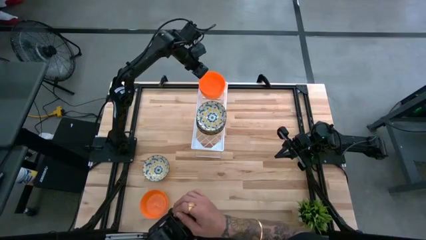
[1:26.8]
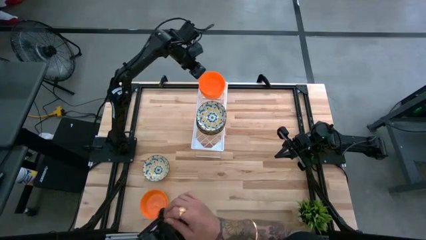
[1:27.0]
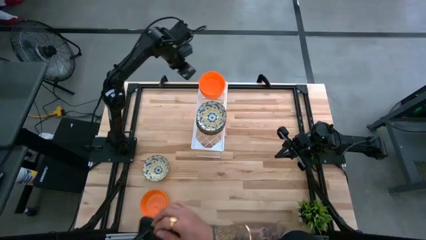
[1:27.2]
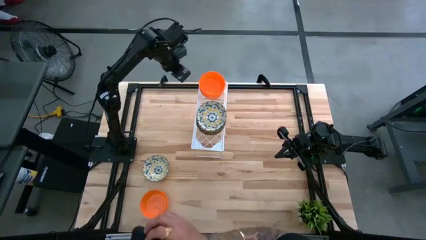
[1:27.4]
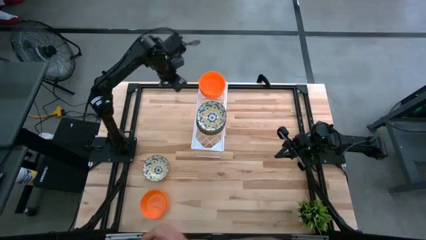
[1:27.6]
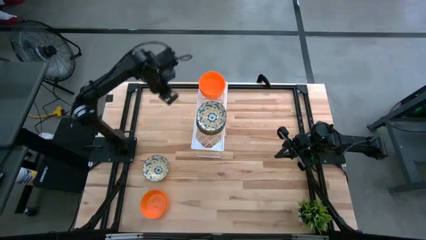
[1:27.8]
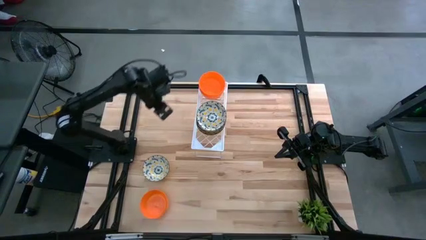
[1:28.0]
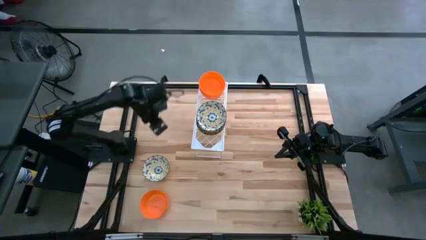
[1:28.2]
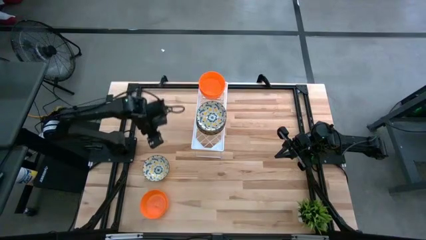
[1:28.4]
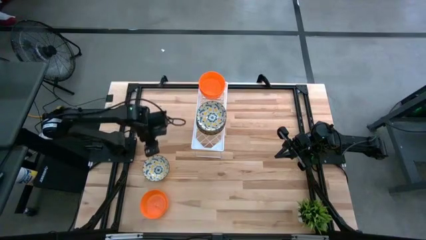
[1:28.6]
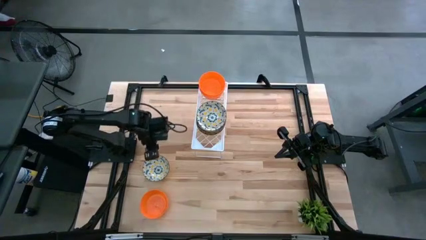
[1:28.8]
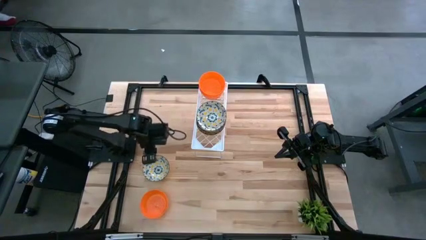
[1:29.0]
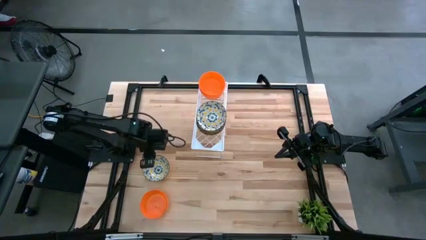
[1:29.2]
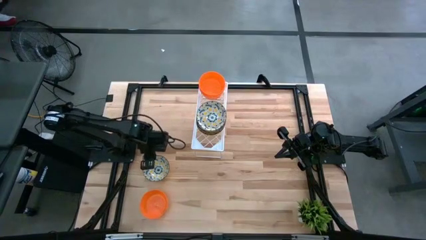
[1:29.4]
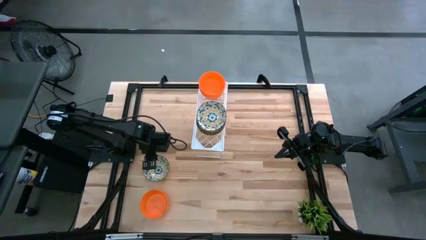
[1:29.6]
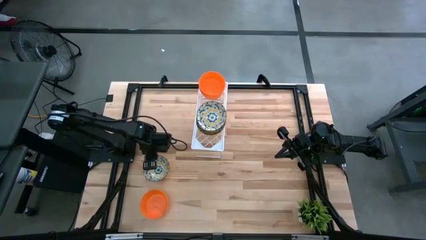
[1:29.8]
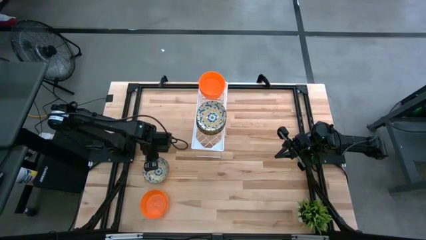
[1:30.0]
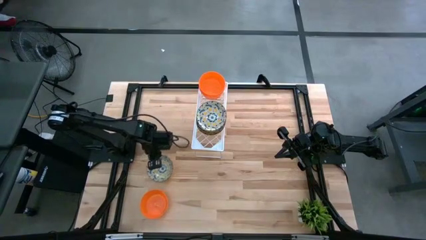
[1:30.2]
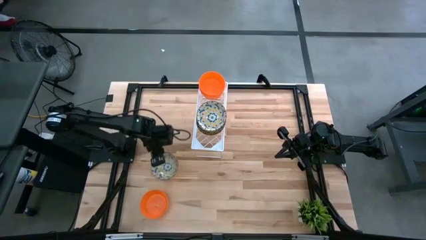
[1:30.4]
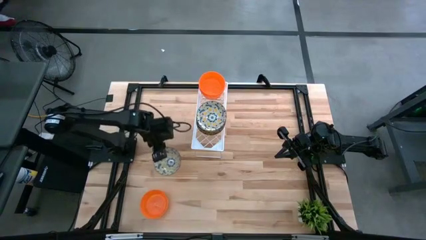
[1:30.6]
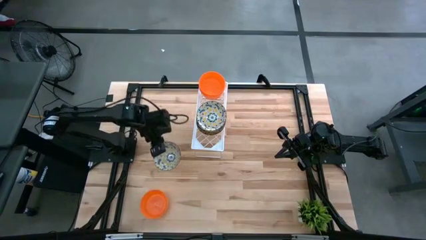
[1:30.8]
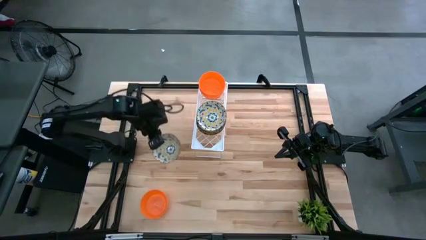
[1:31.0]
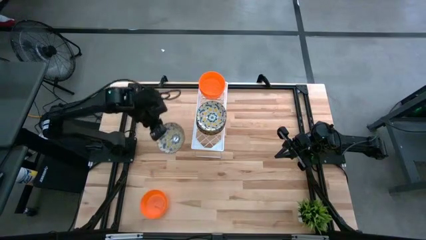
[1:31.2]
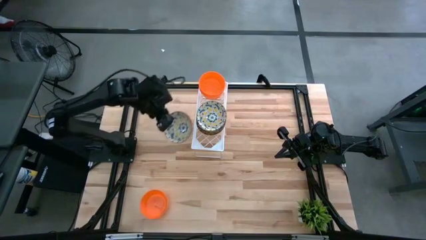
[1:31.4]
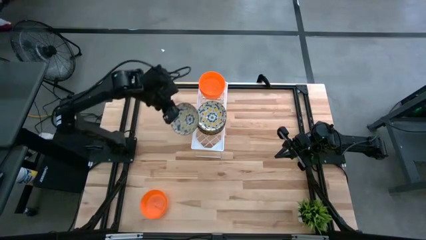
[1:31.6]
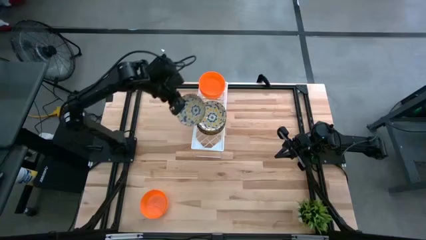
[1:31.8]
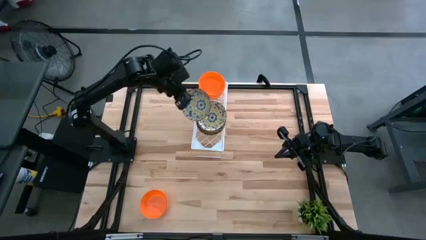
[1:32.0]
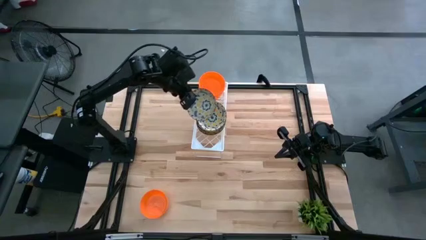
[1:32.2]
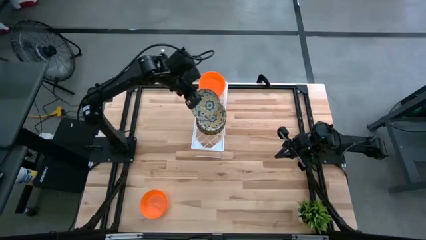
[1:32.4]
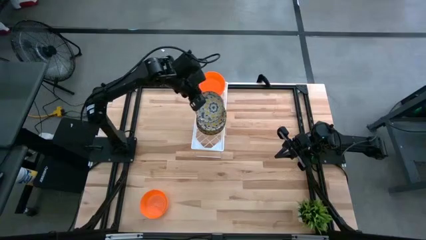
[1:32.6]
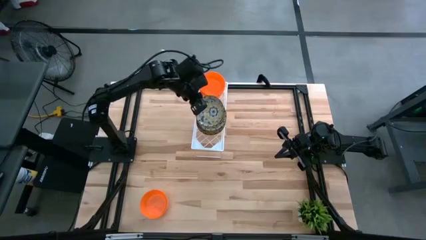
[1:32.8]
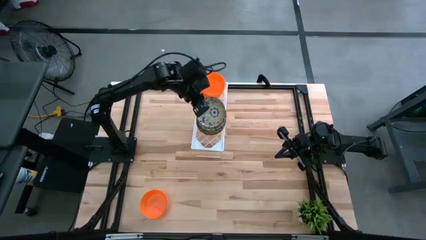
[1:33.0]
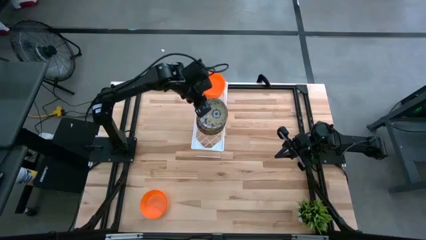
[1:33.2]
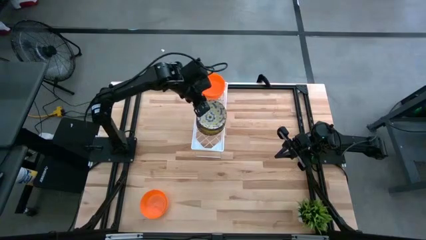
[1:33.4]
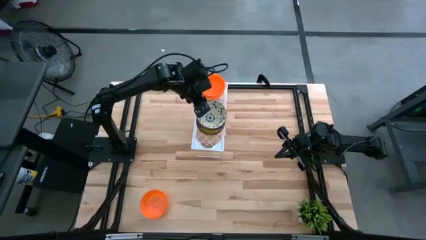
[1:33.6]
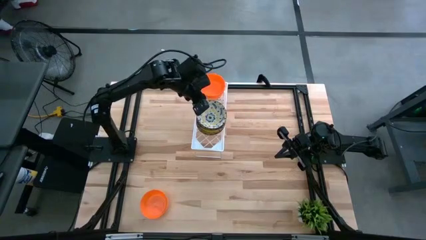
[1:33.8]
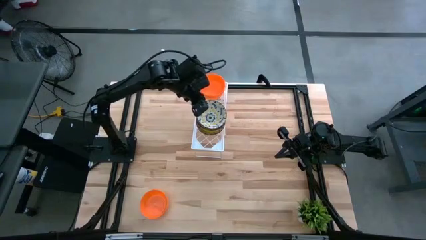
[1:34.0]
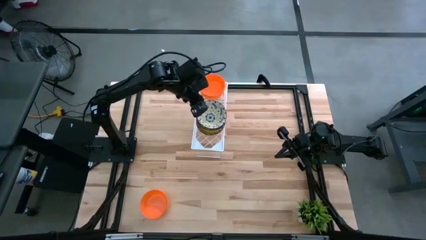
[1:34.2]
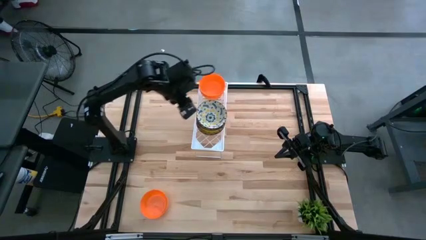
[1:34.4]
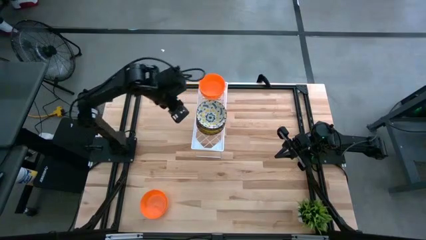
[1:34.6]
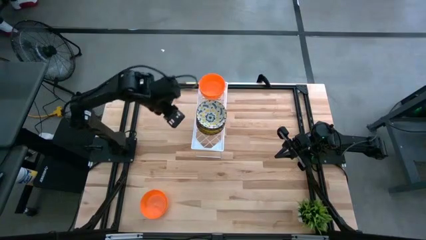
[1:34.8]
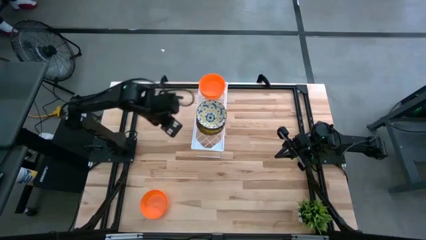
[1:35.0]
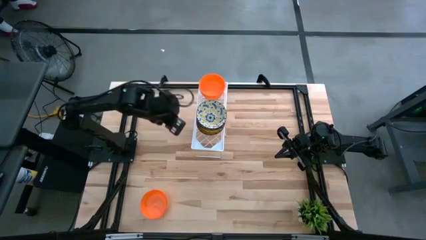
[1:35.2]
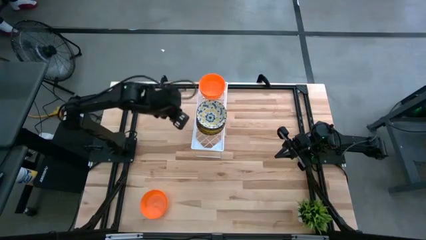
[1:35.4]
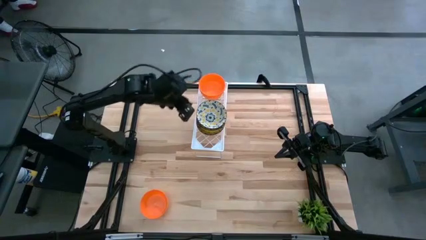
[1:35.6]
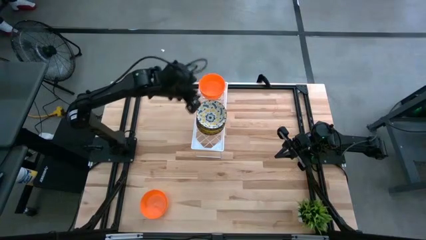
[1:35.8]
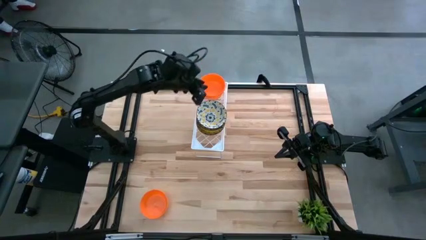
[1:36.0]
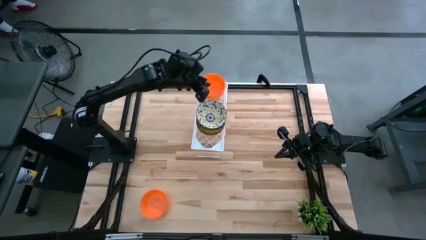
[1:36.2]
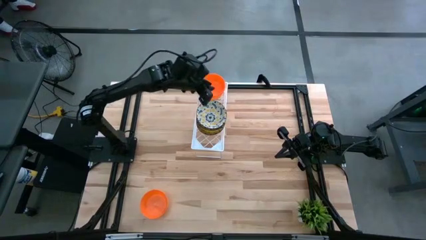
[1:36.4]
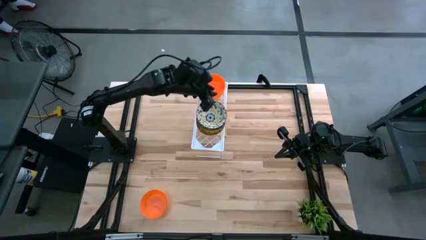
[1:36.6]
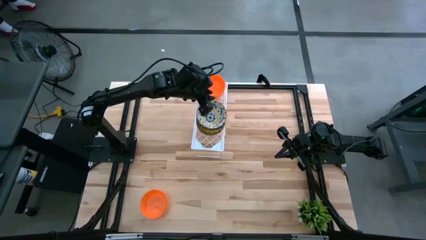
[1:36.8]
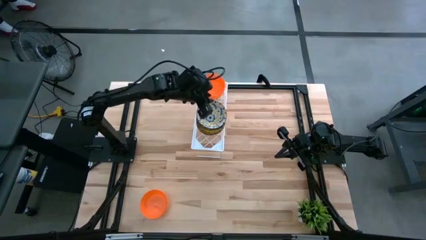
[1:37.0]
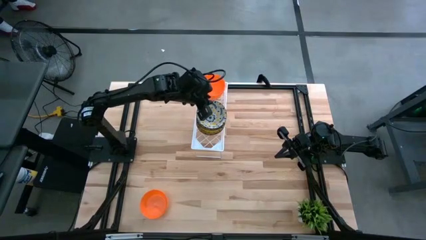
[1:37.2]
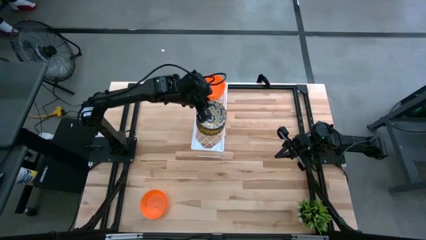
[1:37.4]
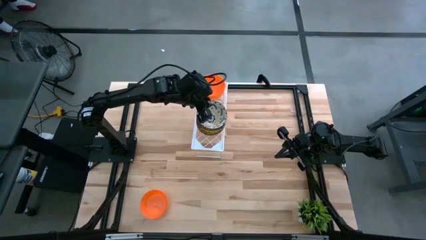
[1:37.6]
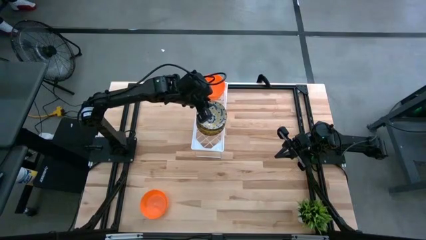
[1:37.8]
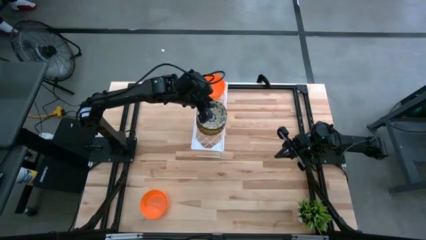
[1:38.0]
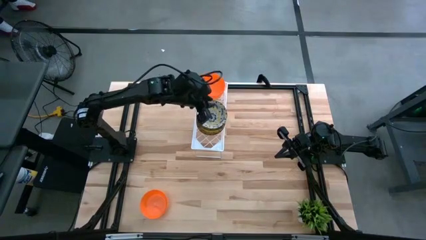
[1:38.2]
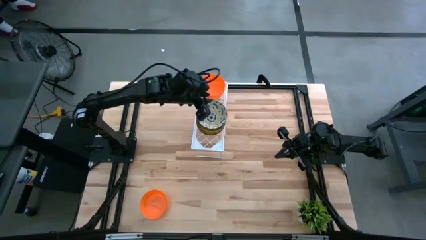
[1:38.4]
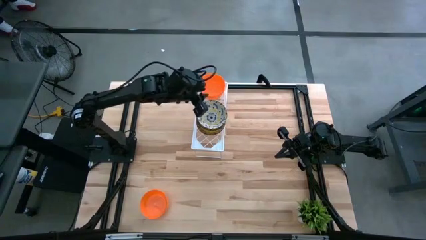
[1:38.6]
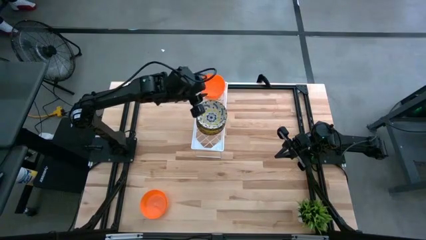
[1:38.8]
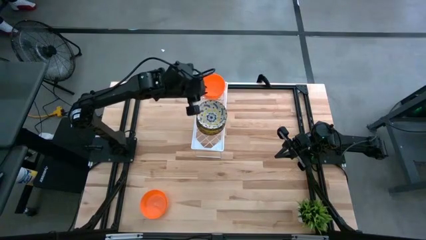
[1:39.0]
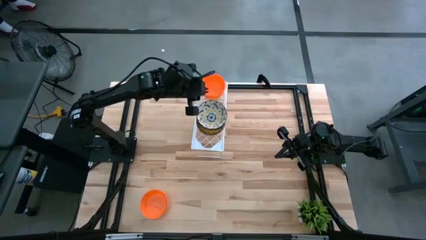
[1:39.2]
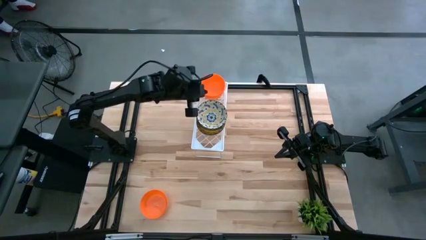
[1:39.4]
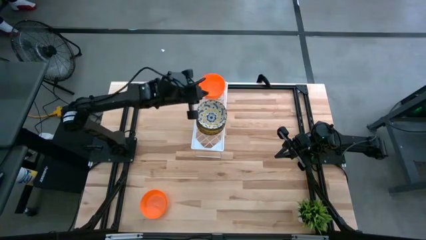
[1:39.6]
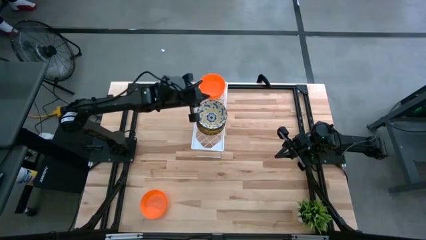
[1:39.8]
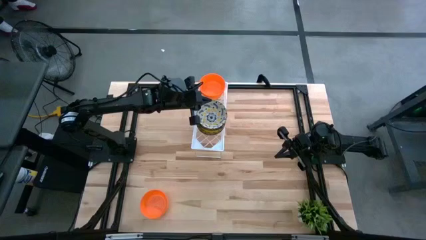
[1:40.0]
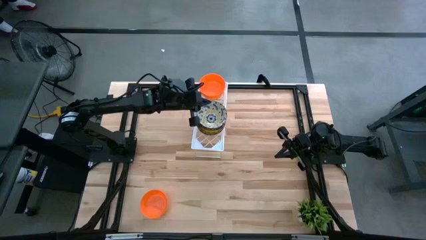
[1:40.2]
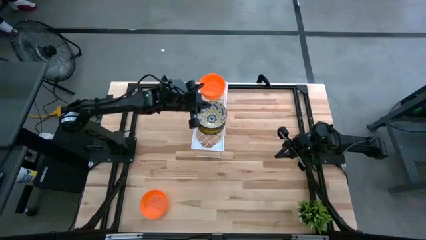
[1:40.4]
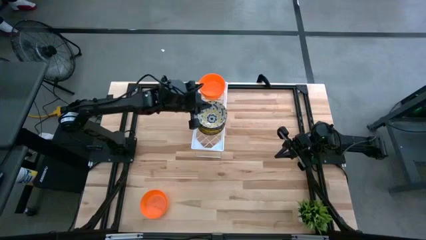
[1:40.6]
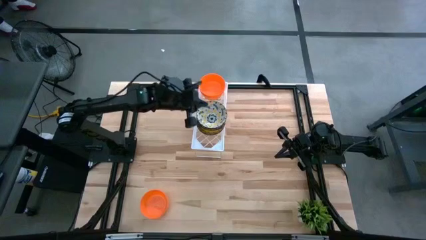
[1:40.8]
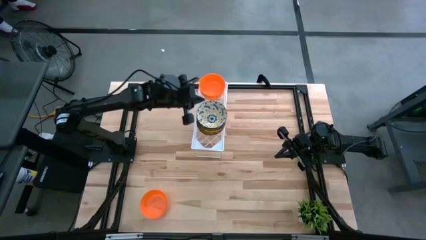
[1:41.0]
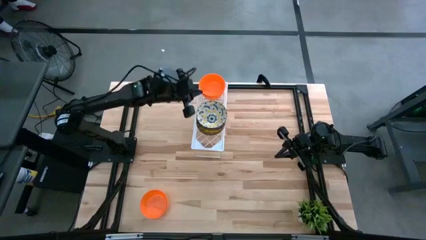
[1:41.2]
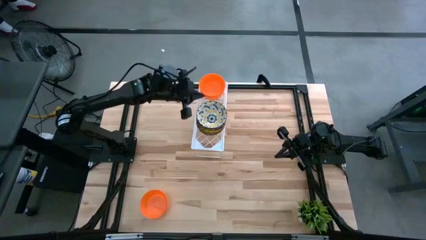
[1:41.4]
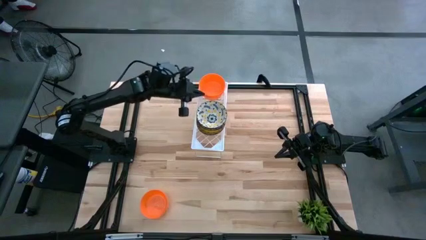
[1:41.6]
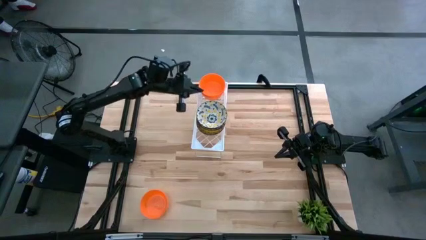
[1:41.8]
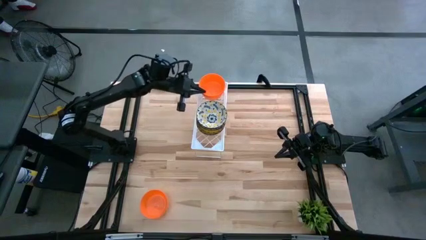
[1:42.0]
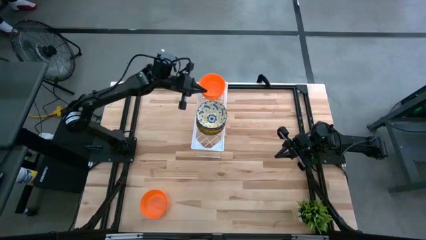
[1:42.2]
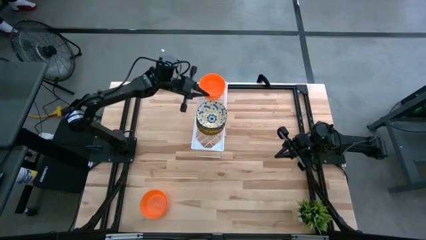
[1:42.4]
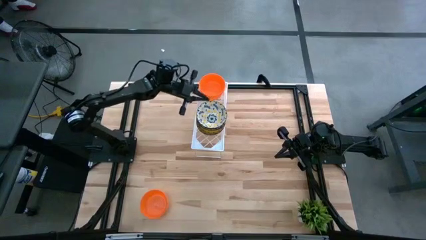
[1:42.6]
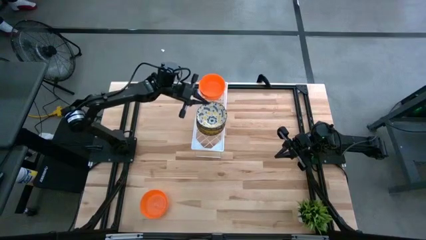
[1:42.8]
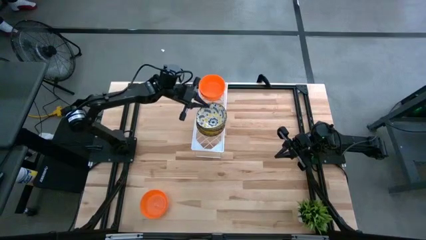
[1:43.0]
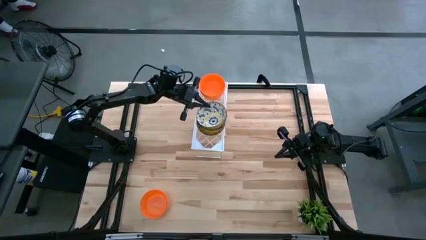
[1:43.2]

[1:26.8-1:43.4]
Task: Pick & Place Mini bowls
Stack the white and yellow bowl on the stacked white and yellow bowls on the shelf
